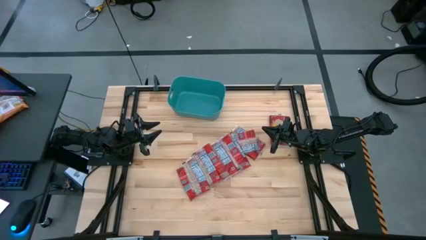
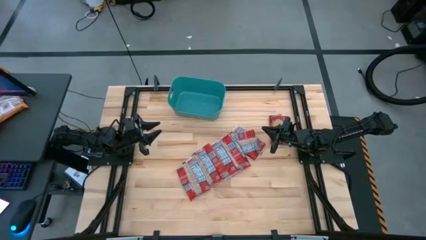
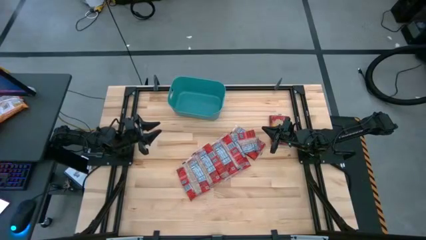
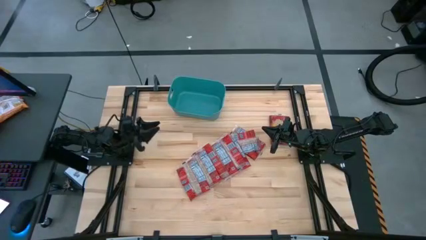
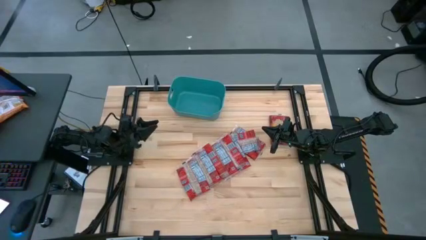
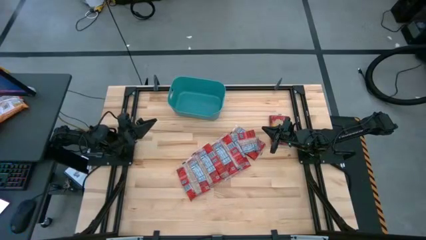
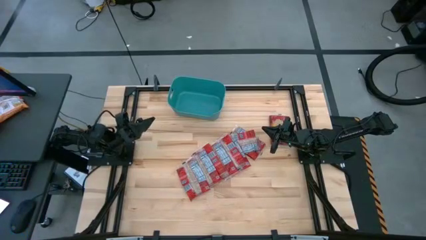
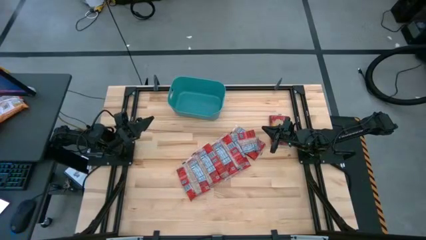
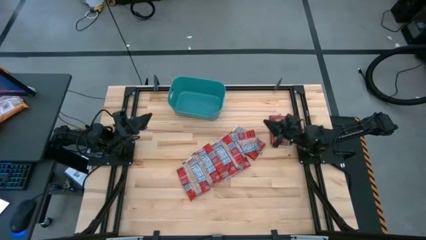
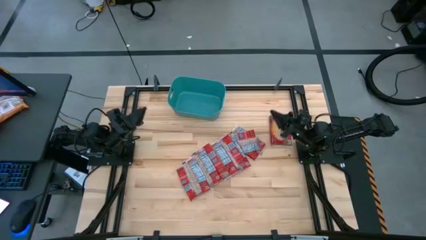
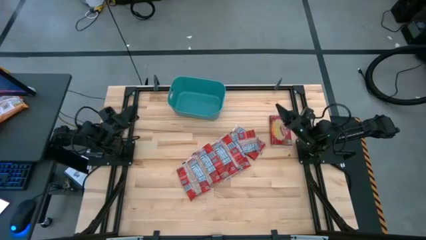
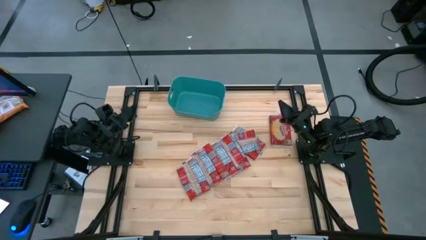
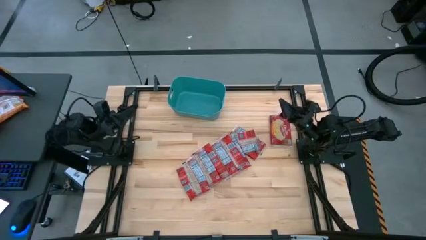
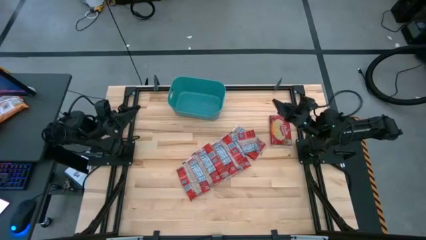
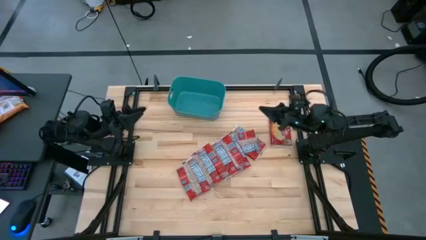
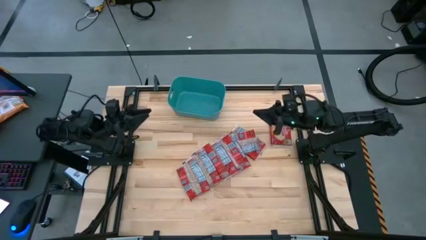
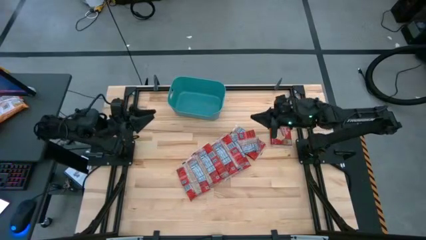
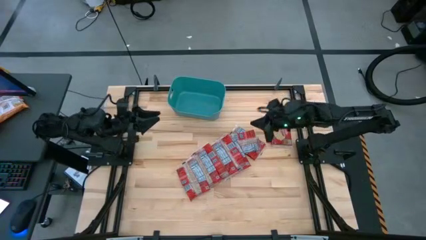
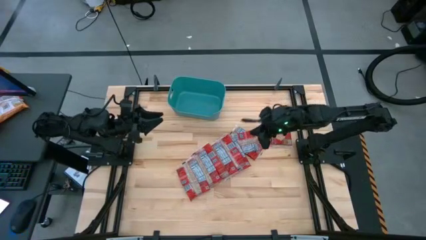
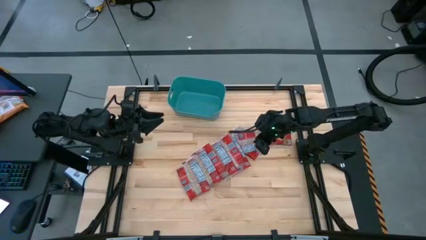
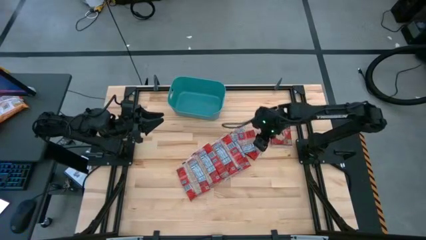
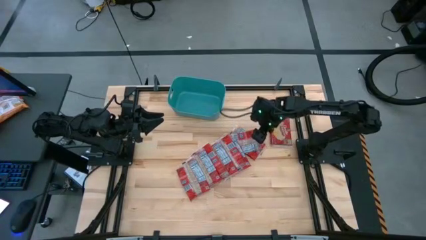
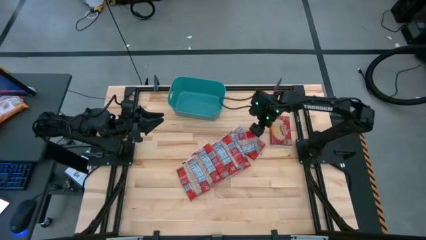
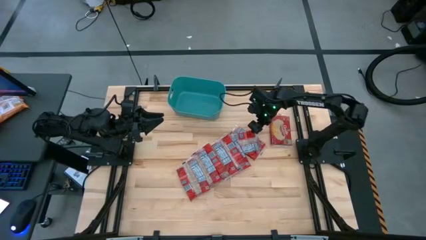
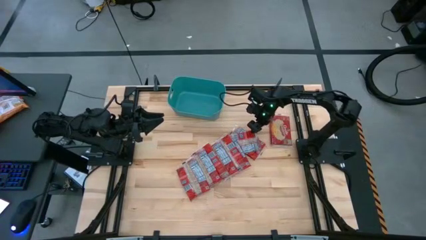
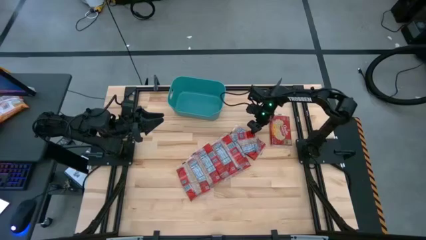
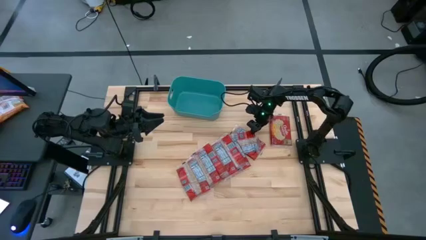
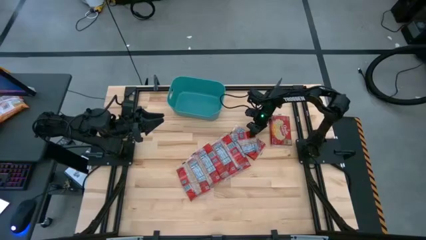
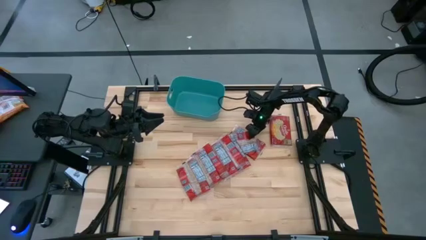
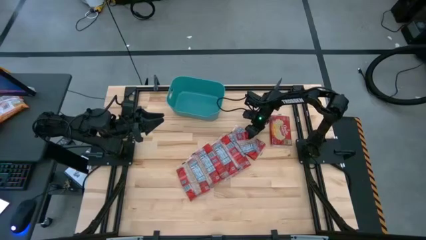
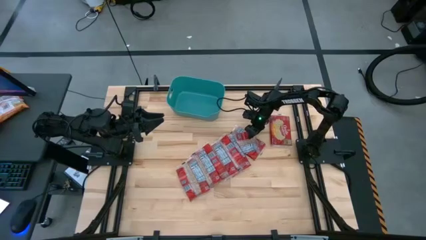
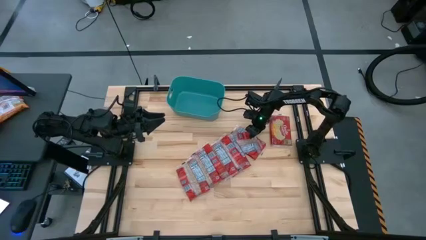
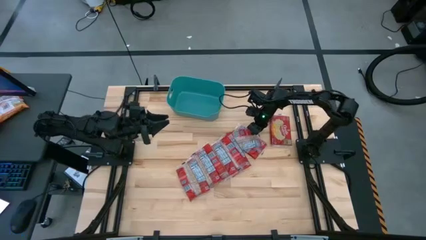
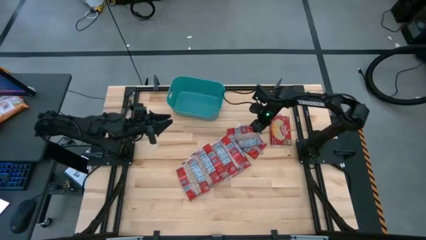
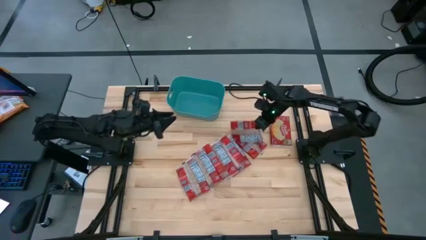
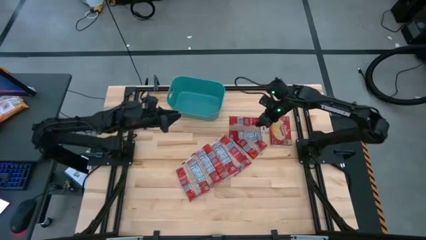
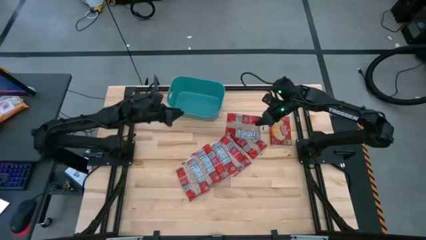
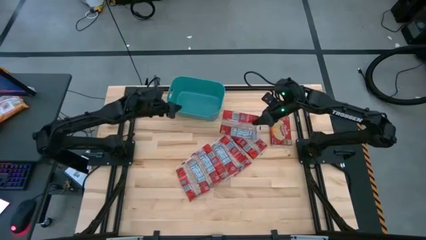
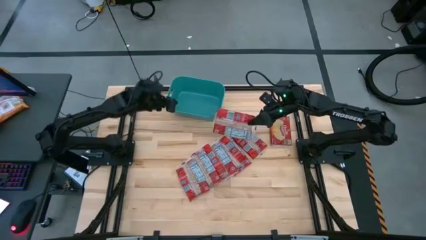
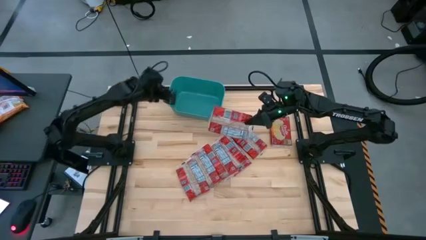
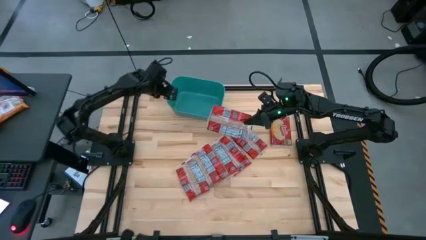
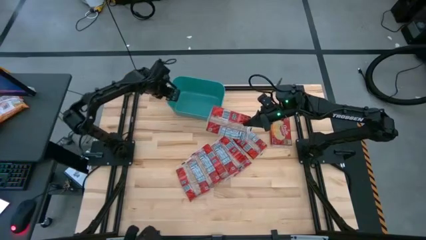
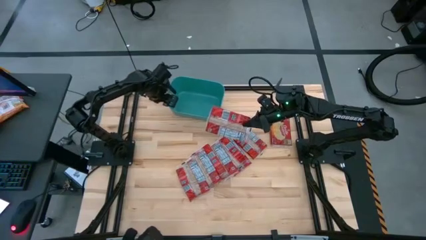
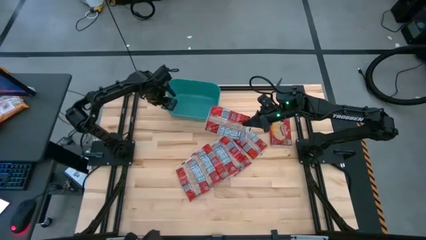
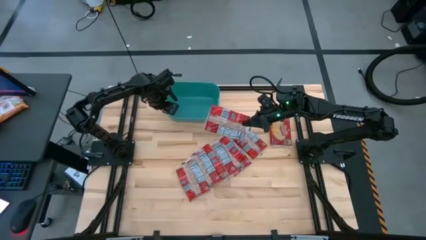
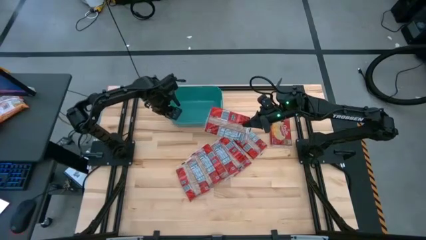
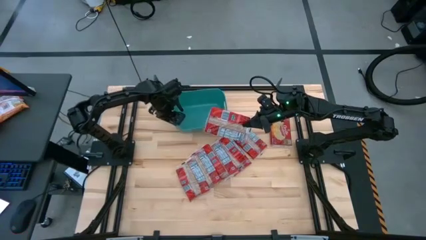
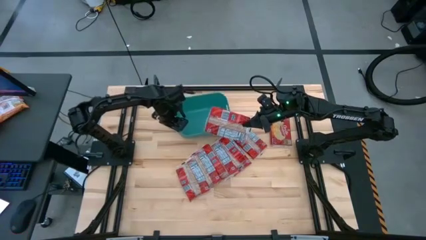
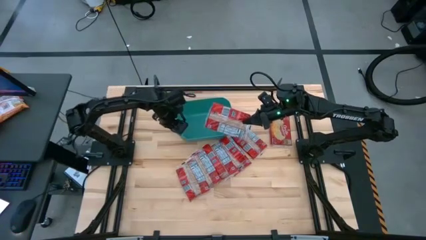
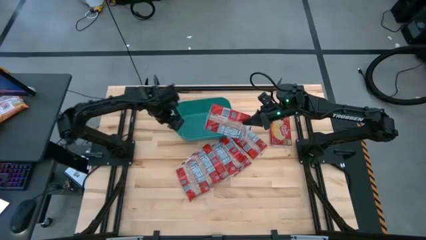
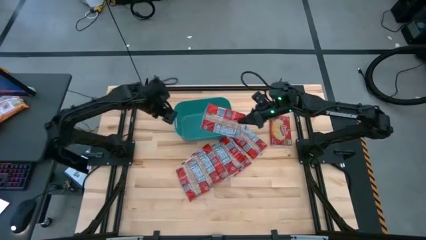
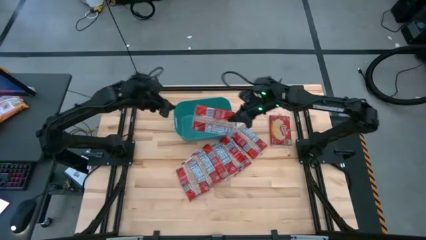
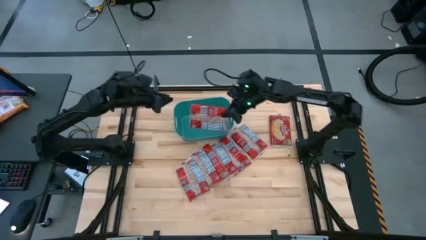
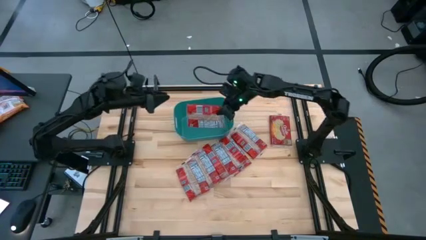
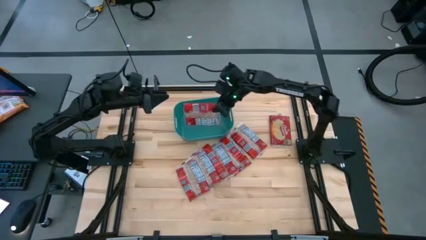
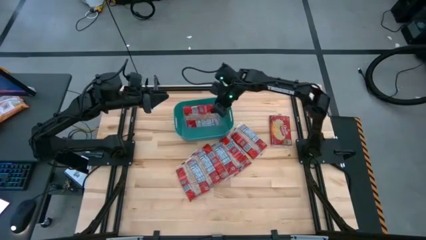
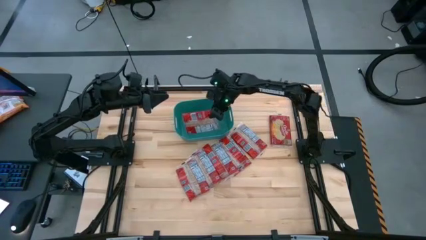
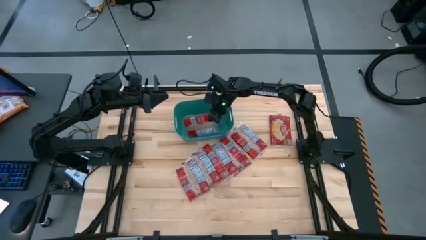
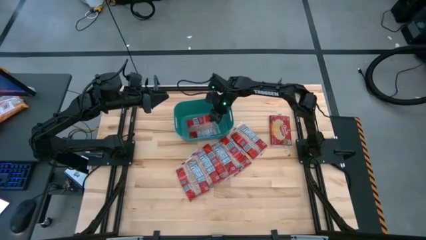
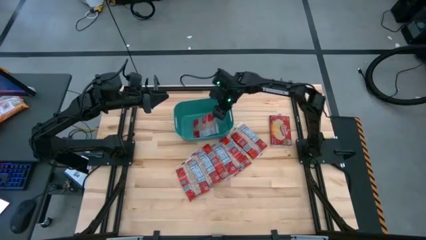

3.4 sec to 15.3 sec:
Task: Sort popcorn bags into baskets
Put the red popcorn bag into the blue bin

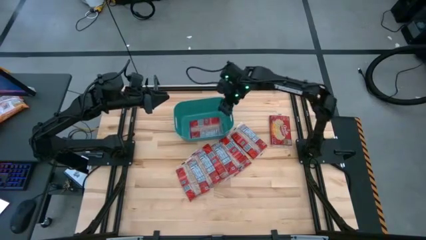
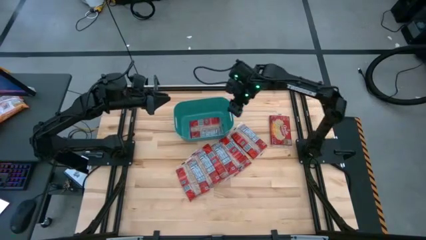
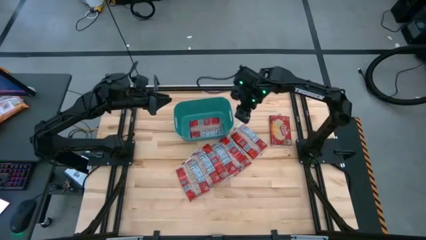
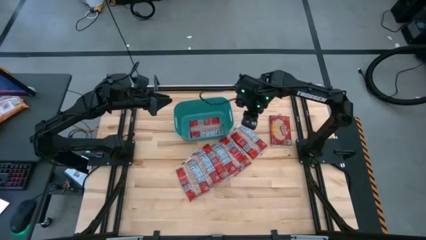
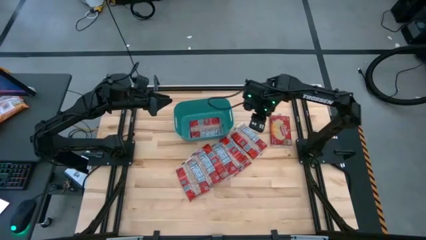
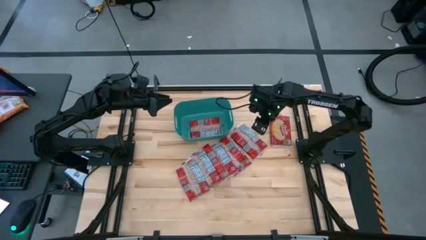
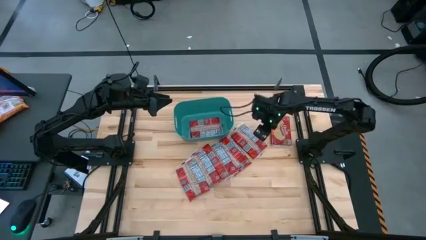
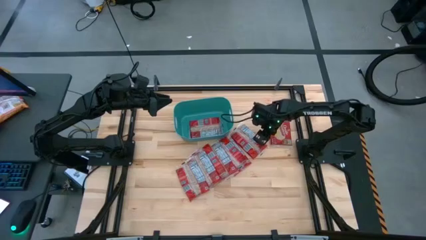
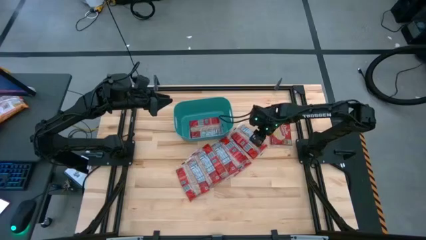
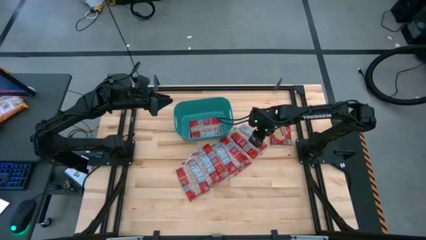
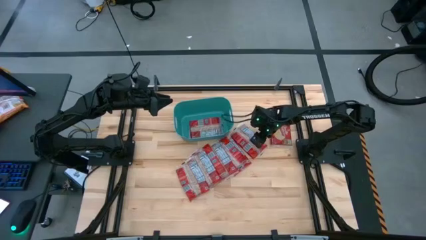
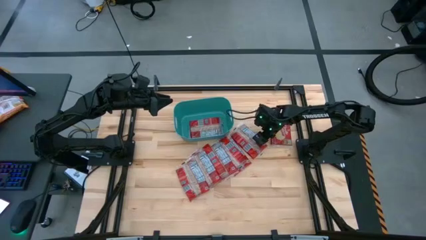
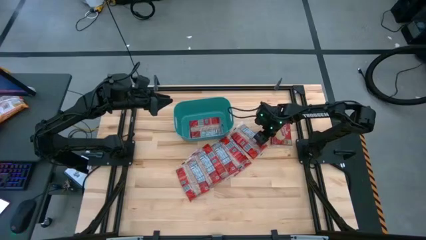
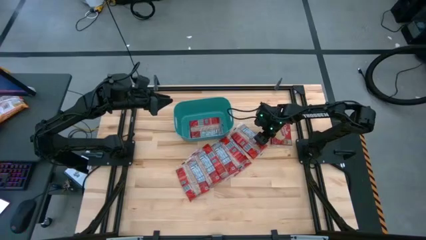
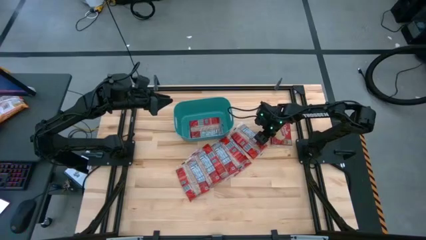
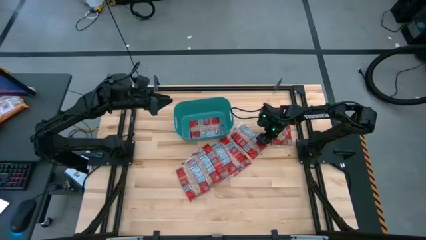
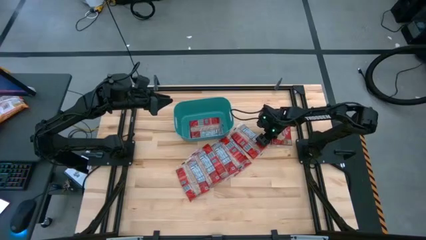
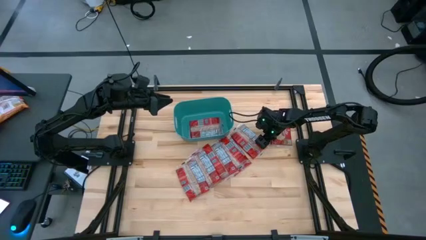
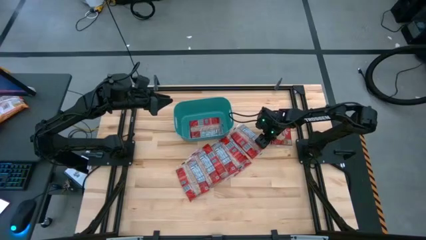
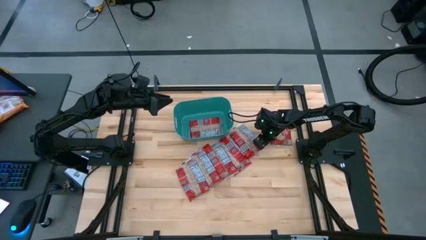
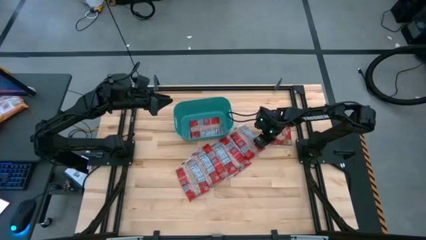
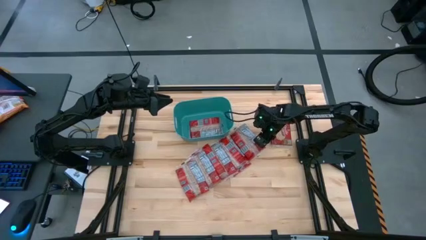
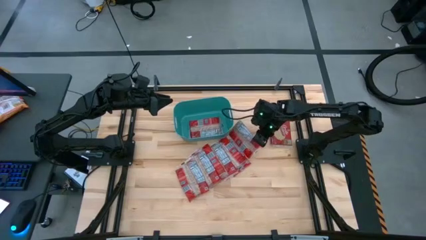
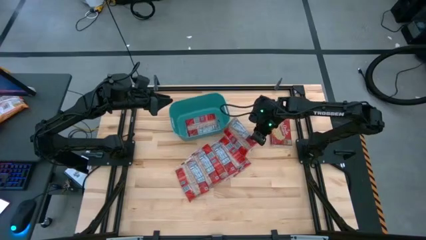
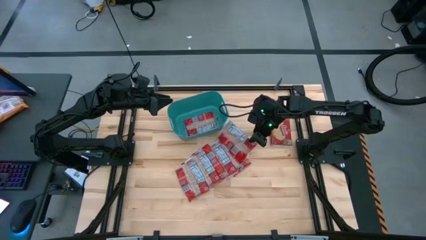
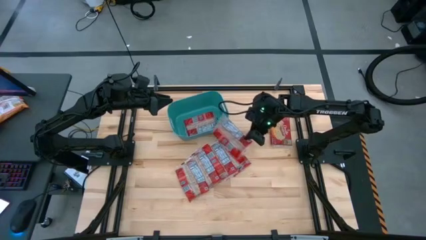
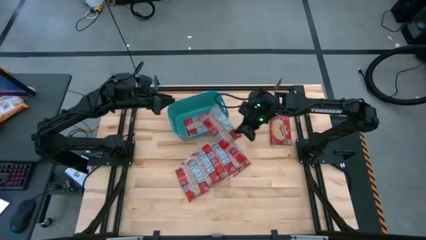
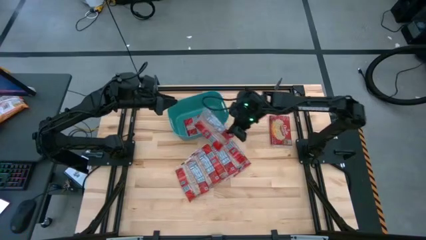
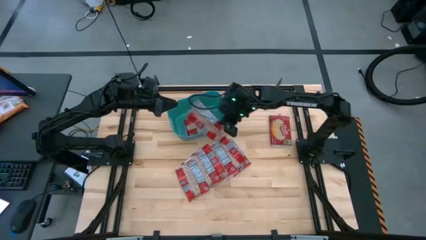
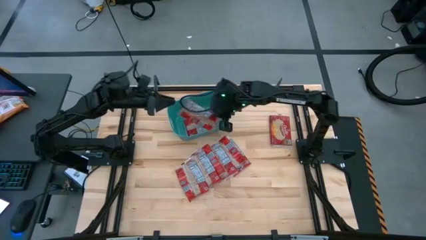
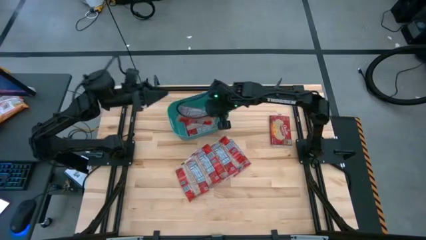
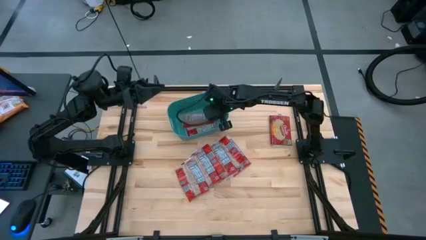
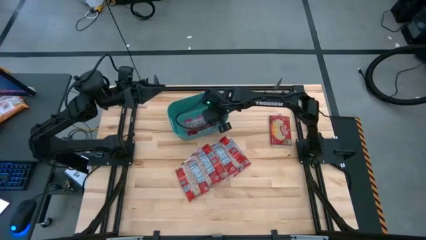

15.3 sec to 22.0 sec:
Put the red popcorn bag into the blue bin
